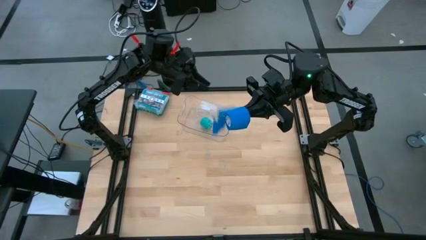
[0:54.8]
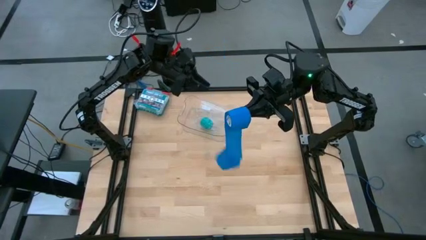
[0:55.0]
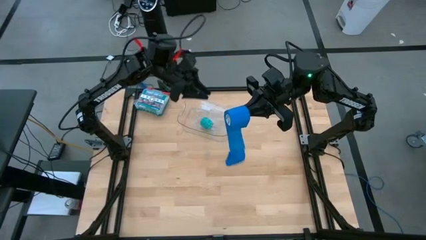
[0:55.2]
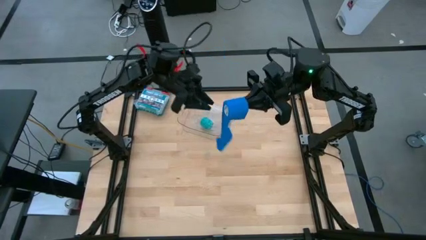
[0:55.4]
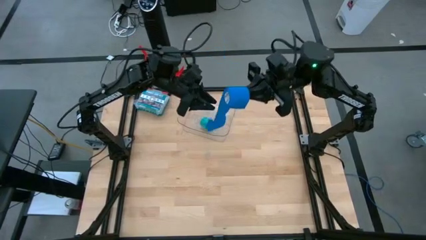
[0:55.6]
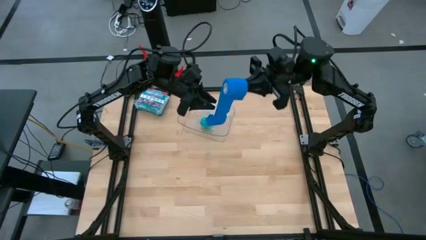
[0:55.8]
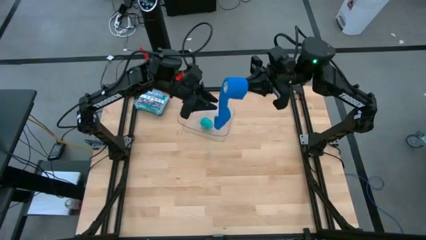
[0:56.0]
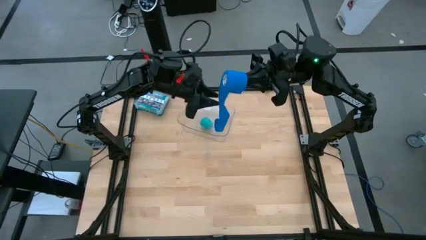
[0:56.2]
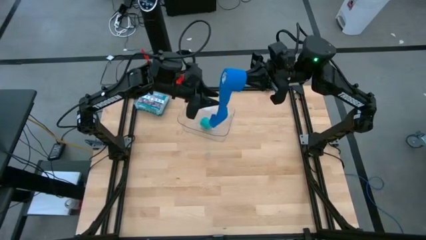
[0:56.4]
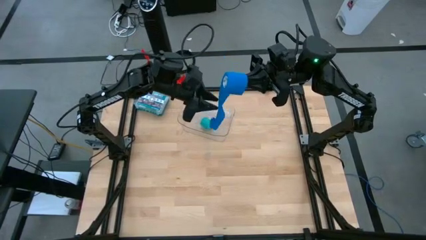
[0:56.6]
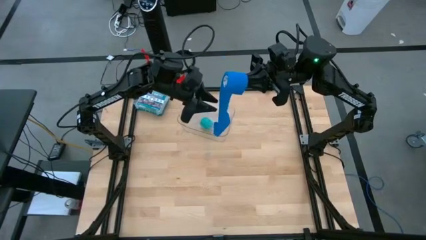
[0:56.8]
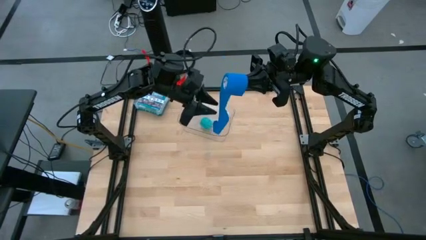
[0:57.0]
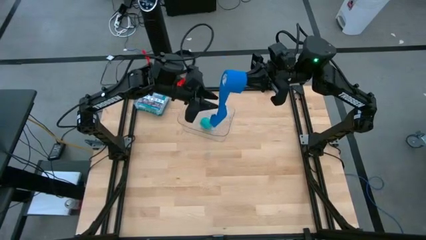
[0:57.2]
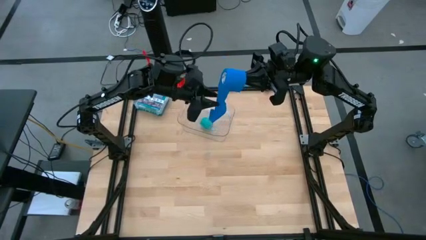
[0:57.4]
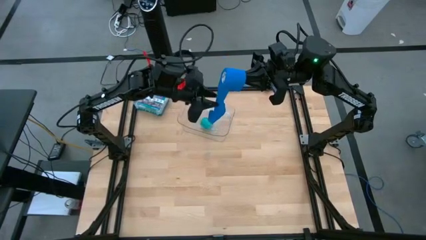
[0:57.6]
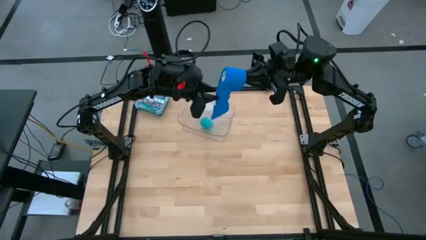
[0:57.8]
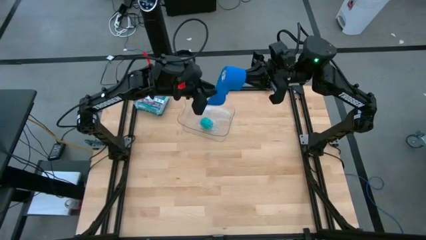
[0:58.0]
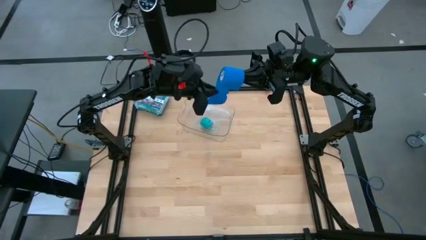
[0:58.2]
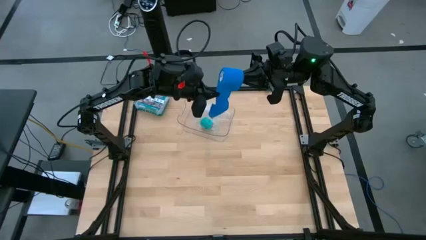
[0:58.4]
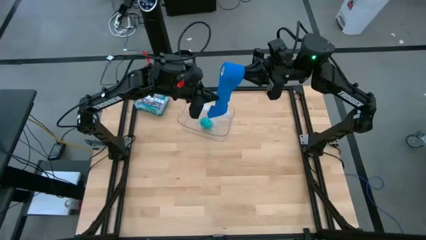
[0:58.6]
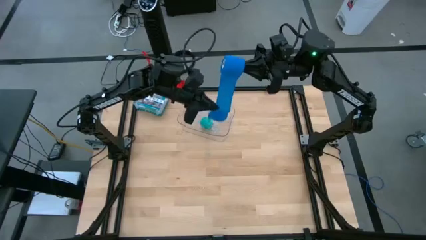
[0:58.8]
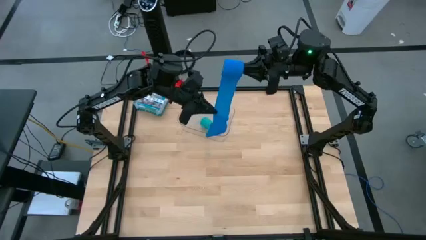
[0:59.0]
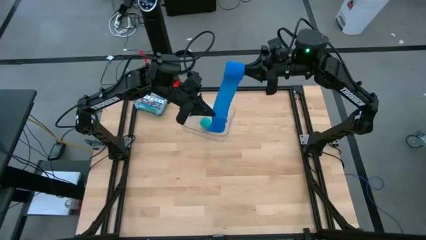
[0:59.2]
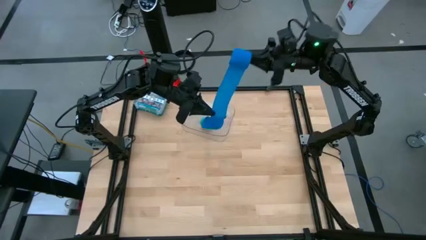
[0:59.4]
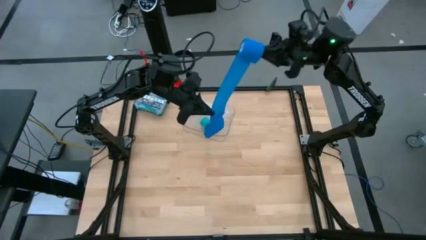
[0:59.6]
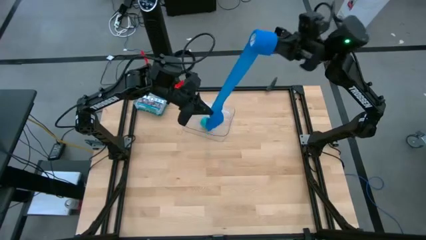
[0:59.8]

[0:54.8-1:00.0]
Task: Roll bandage
Roll the blue bandage

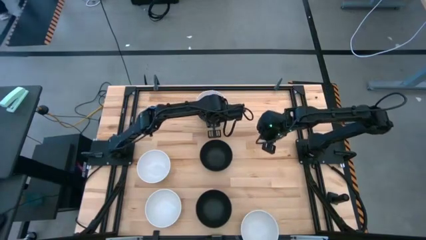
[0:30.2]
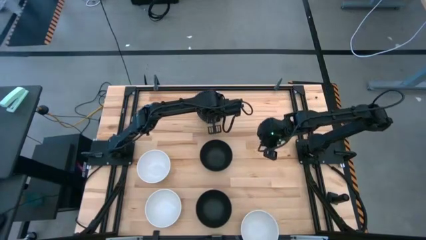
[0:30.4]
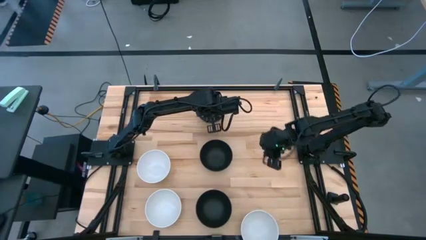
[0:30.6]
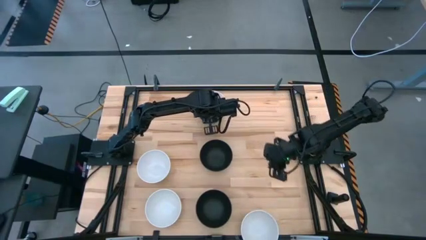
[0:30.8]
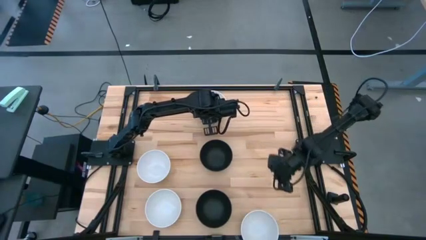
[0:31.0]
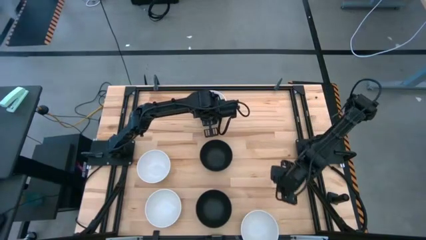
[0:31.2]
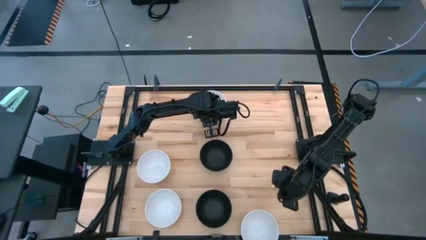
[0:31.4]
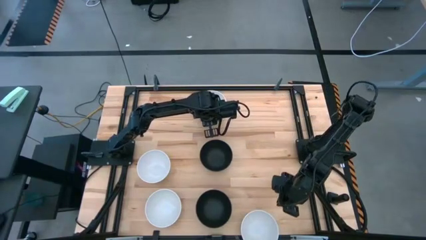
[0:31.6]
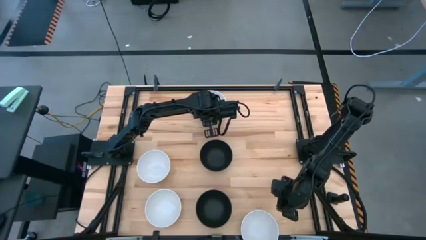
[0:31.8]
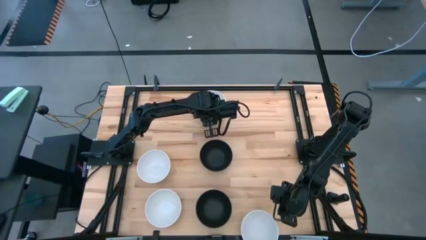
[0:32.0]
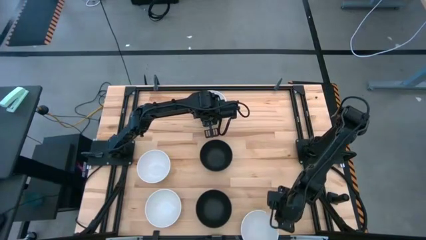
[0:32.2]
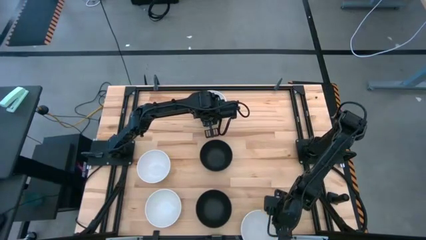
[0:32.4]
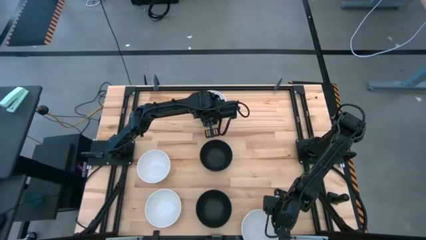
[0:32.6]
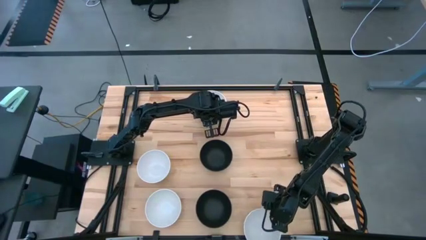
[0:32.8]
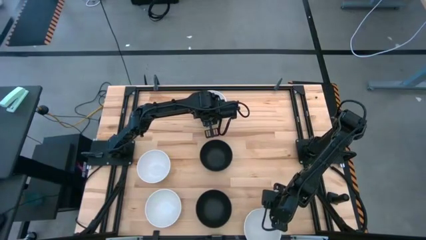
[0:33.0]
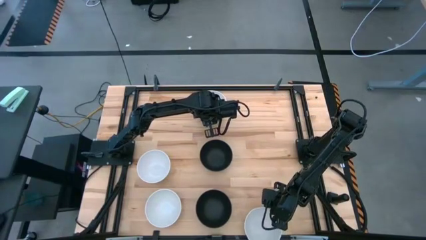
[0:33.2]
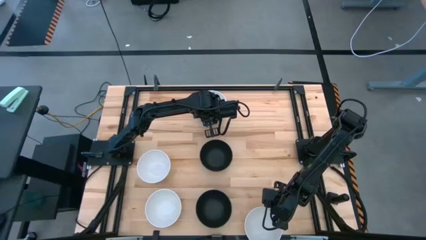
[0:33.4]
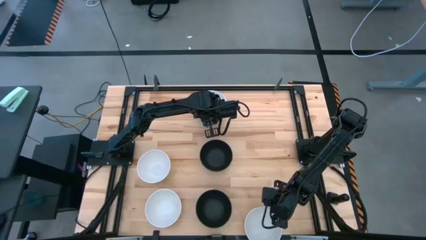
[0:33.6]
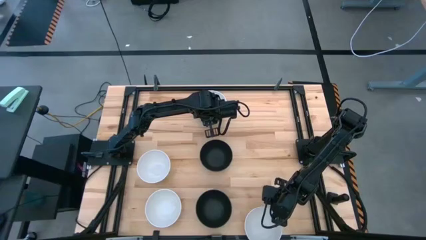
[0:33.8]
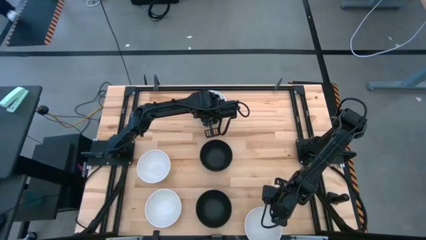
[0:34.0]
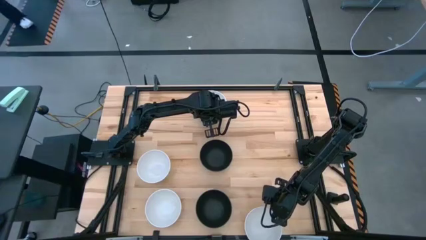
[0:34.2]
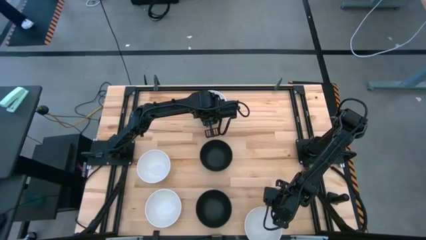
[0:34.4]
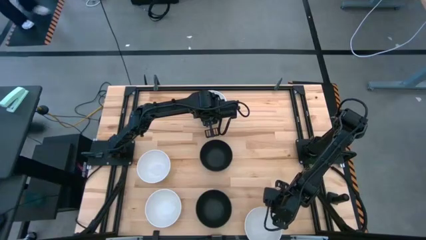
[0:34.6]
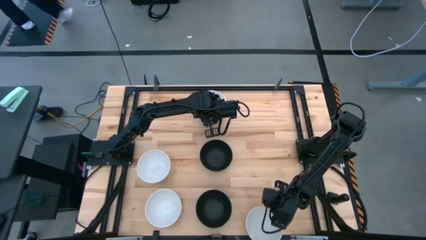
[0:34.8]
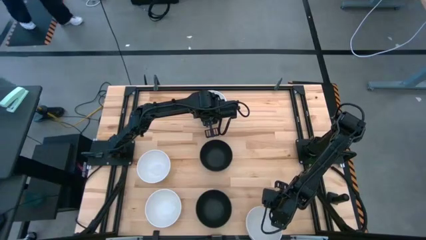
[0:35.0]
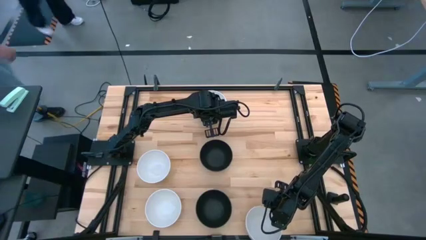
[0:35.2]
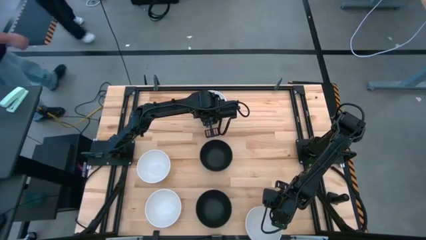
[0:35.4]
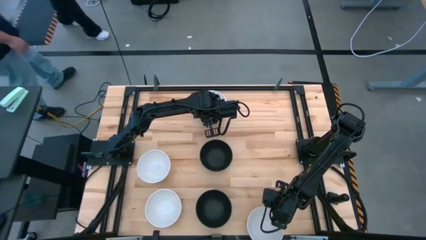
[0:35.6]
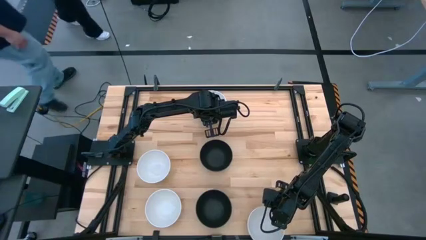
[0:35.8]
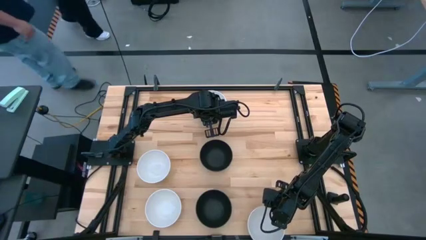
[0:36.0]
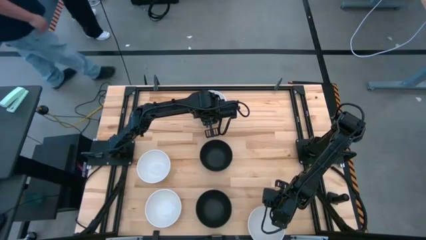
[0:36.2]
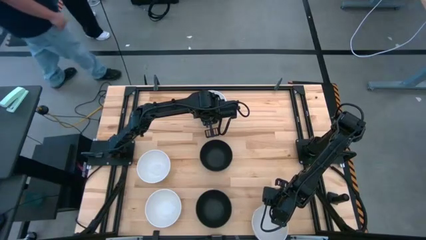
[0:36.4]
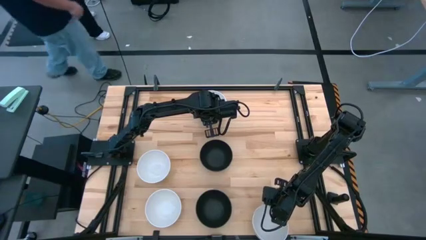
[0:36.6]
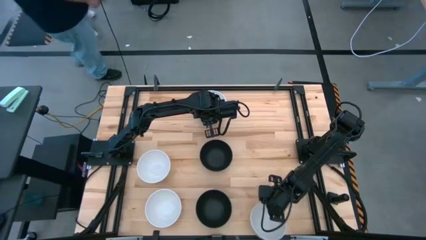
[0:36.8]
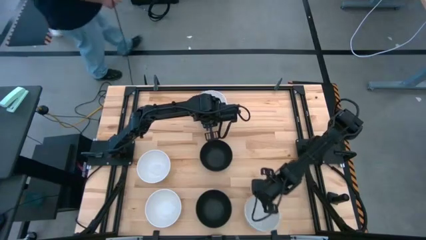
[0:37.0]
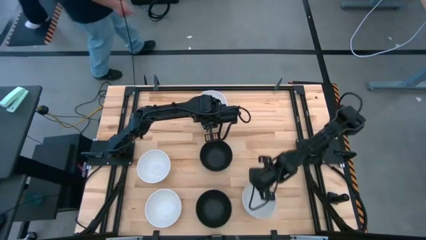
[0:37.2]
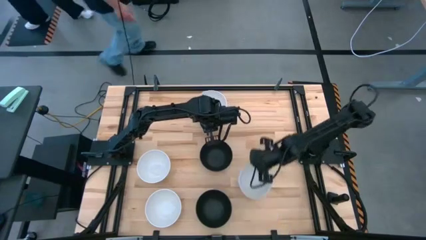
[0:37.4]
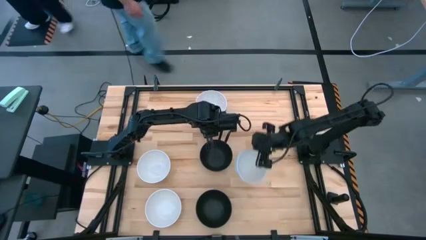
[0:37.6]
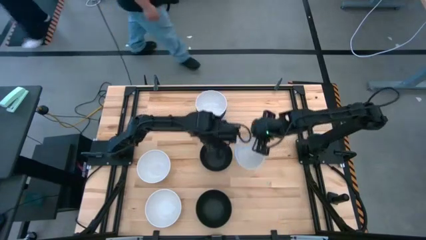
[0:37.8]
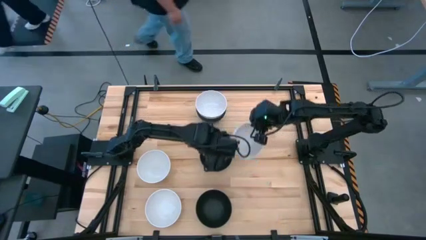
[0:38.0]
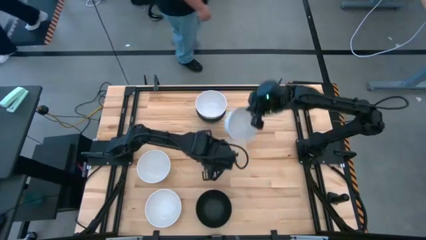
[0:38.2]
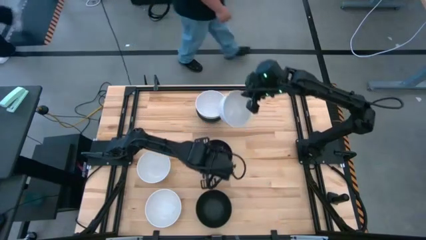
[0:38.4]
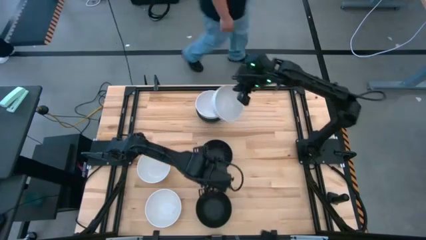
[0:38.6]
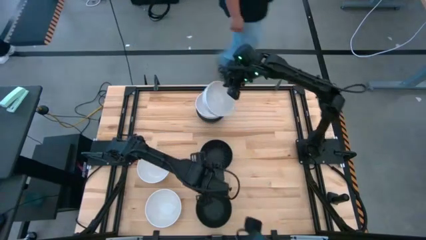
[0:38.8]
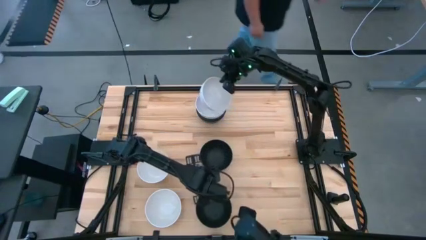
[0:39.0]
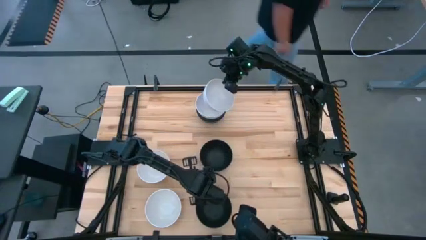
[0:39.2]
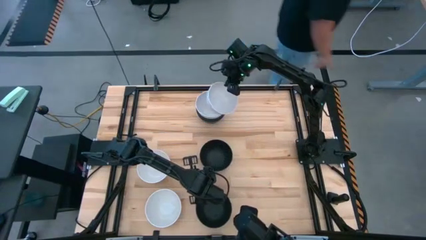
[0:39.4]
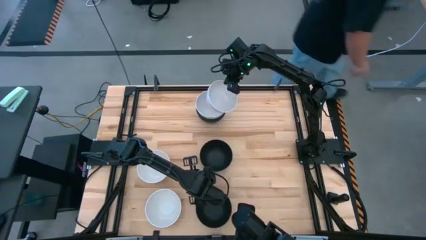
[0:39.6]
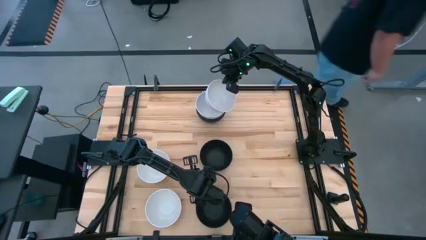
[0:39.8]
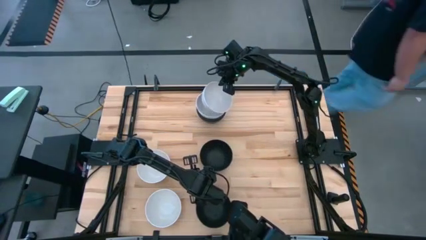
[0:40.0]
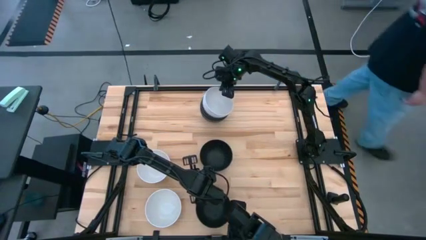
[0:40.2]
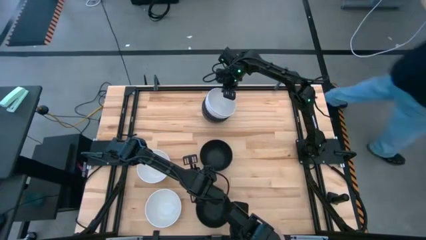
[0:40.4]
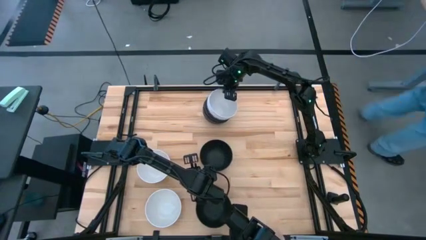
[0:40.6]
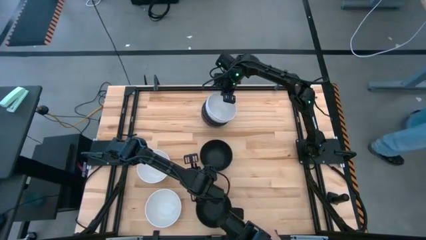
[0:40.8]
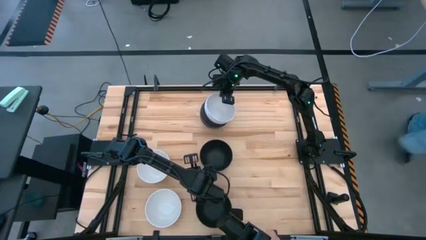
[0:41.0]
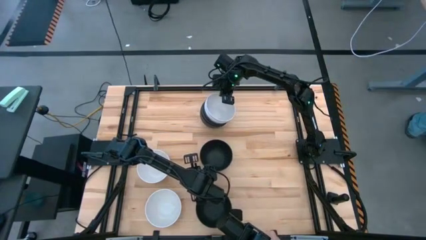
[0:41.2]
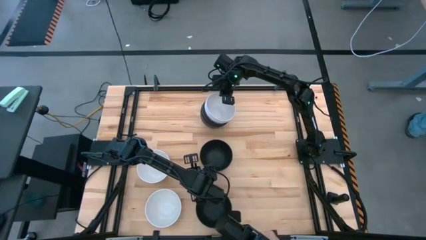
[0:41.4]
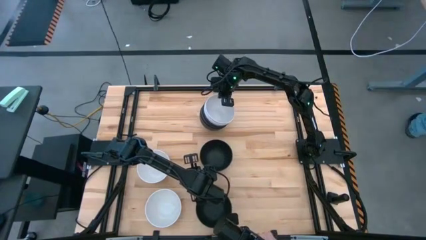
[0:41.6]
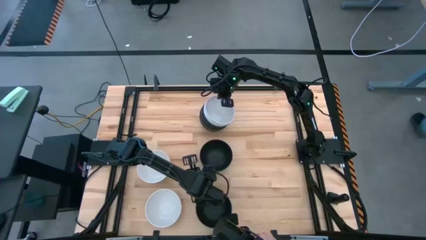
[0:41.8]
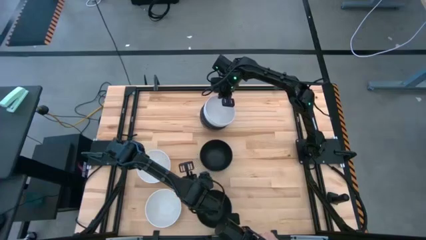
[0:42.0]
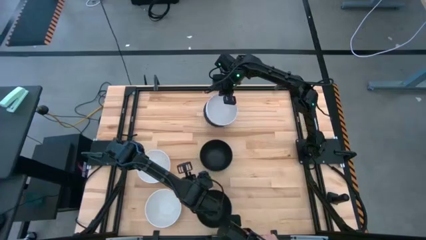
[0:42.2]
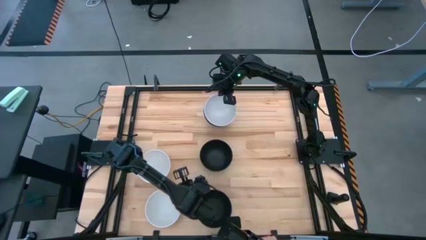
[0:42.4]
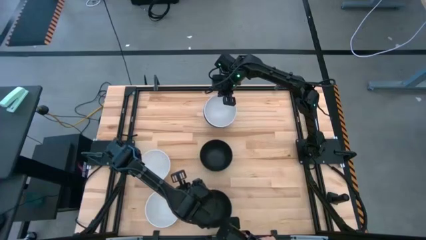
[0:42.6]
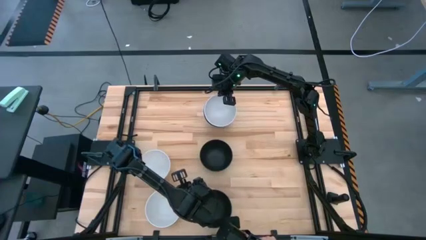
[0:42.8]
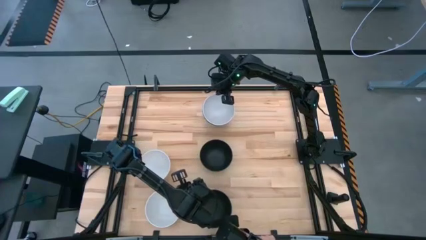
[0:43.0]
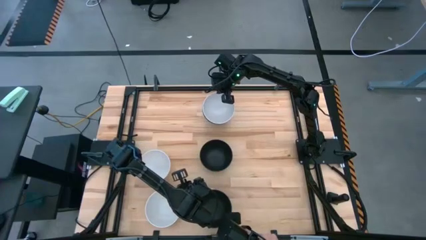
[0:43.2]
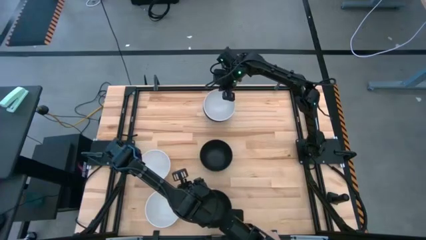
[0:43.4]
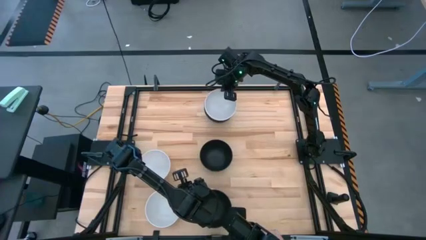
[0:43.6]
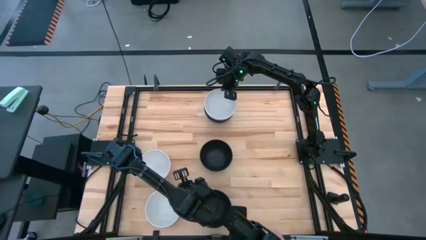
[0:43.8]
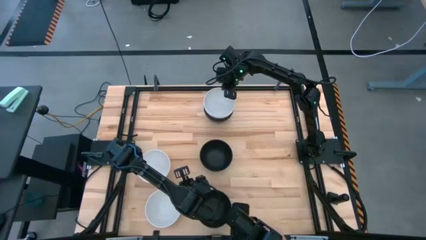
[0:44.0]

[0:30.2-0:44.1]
Task: Nest bowls inside each other
Stack the white bowl on top of the stacked white bowls
